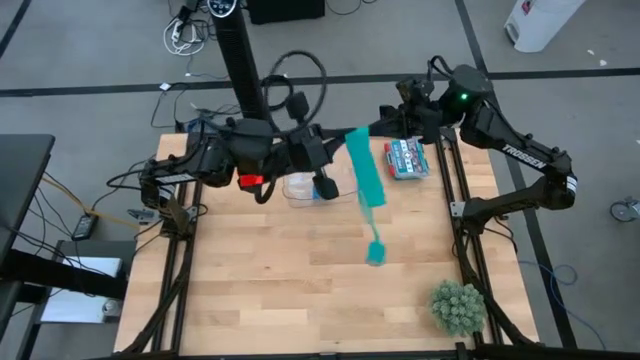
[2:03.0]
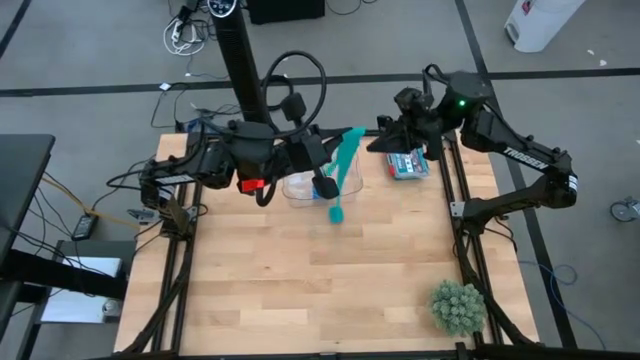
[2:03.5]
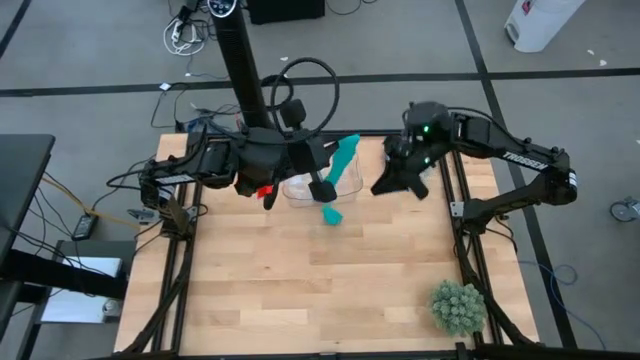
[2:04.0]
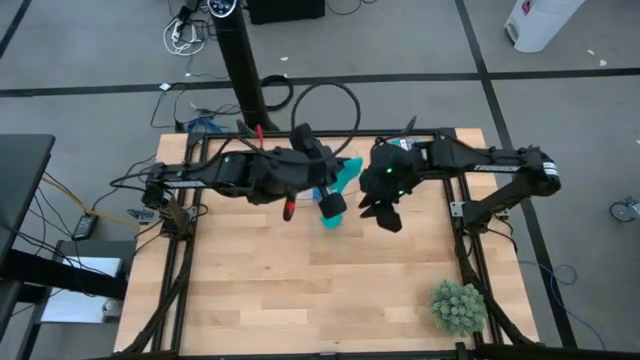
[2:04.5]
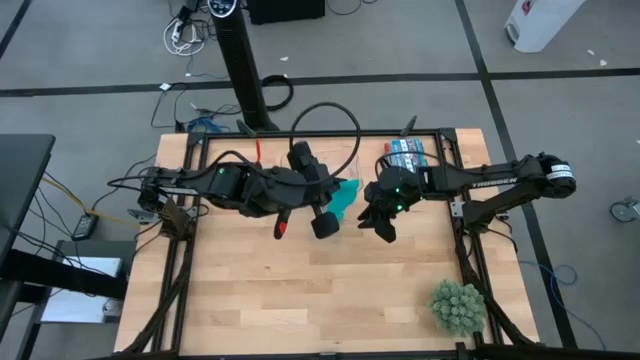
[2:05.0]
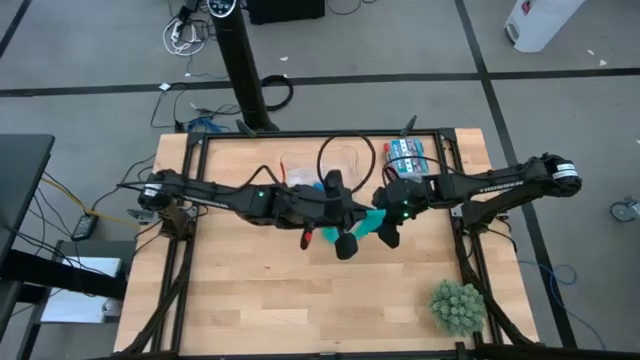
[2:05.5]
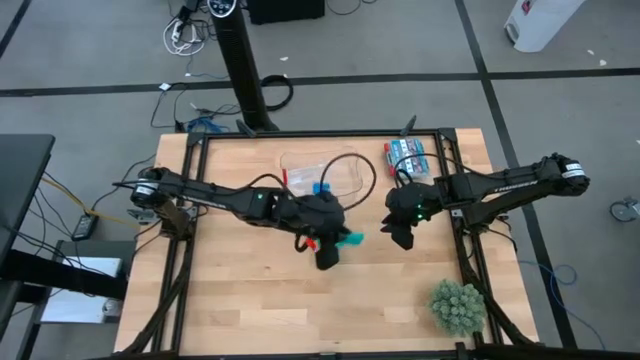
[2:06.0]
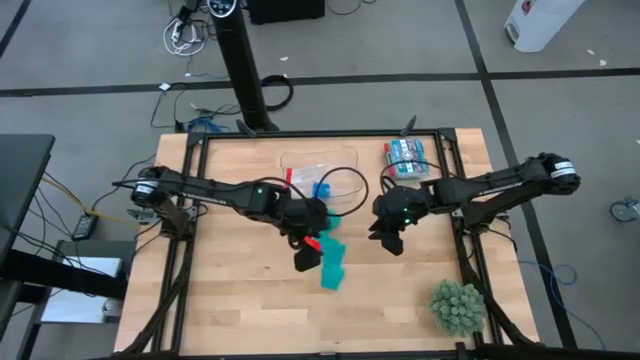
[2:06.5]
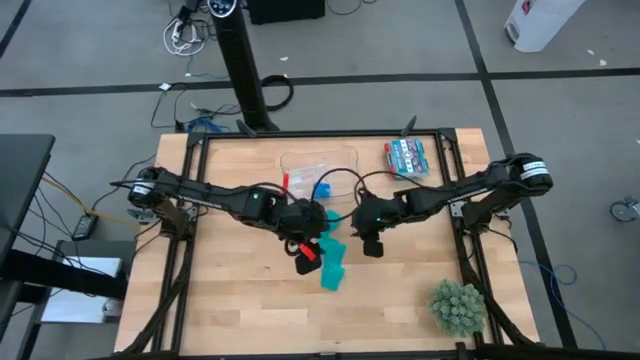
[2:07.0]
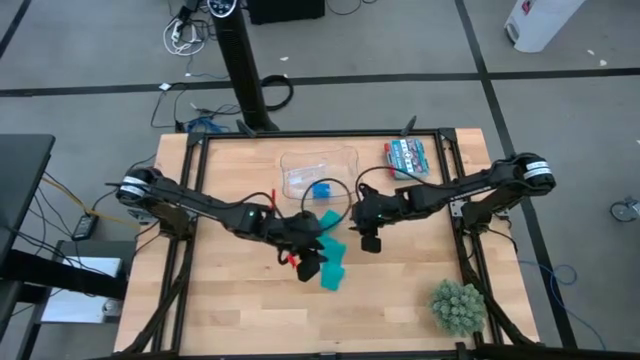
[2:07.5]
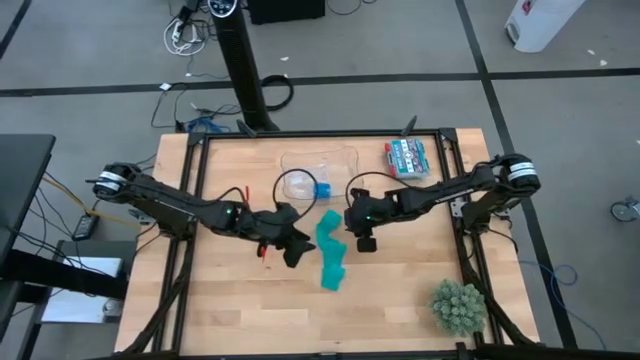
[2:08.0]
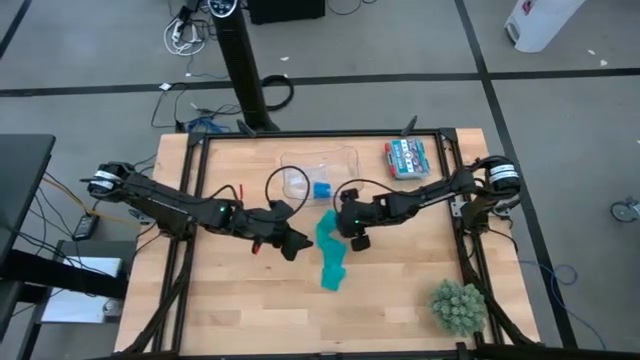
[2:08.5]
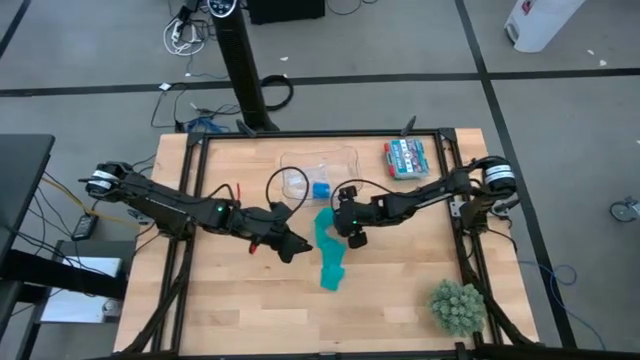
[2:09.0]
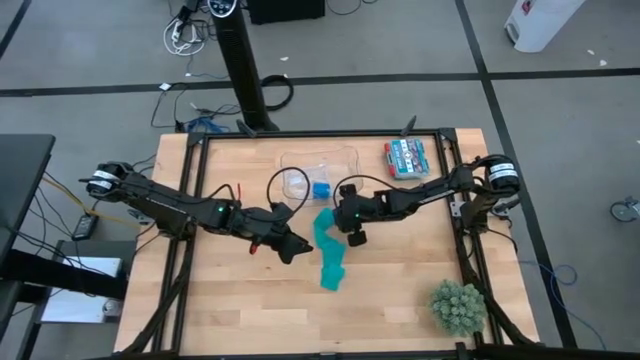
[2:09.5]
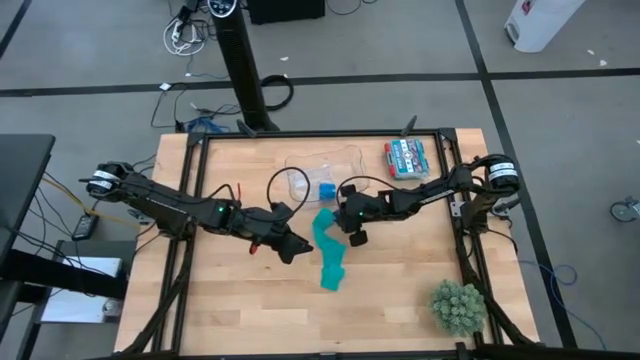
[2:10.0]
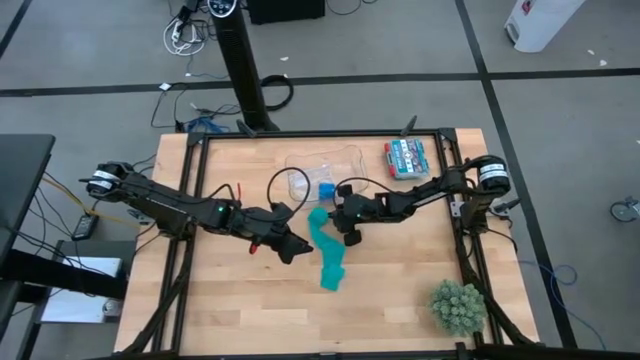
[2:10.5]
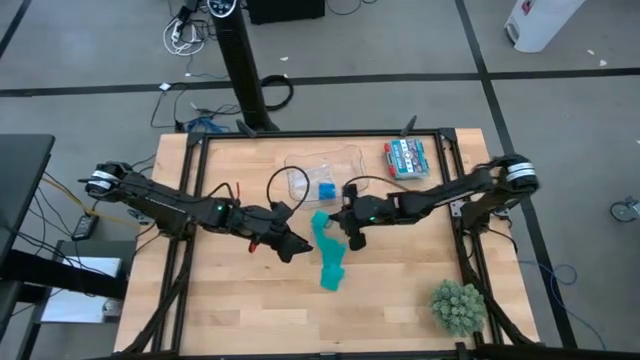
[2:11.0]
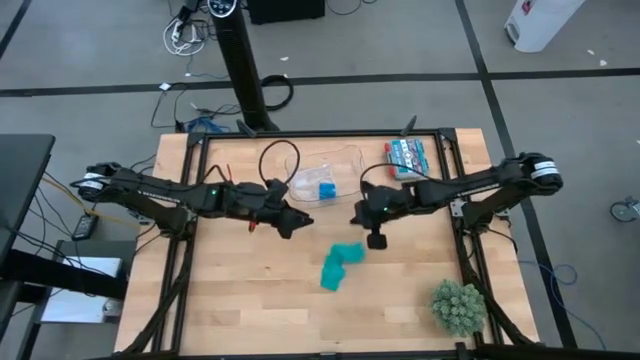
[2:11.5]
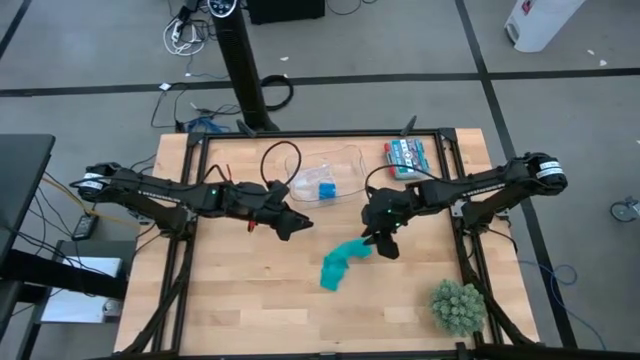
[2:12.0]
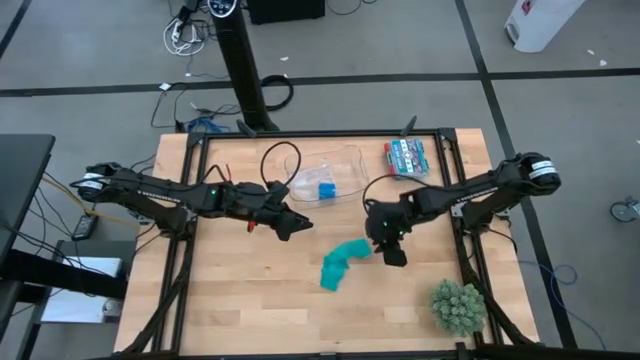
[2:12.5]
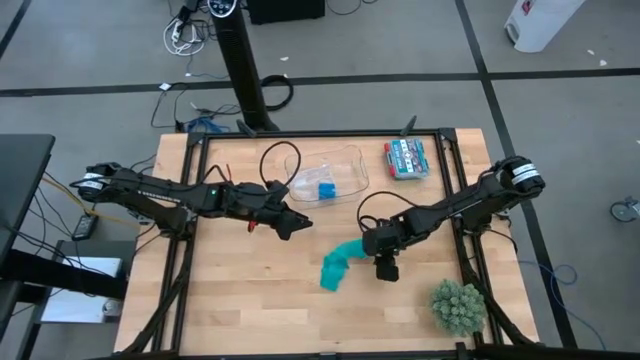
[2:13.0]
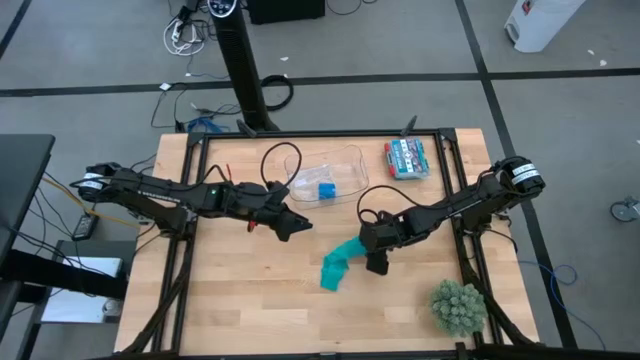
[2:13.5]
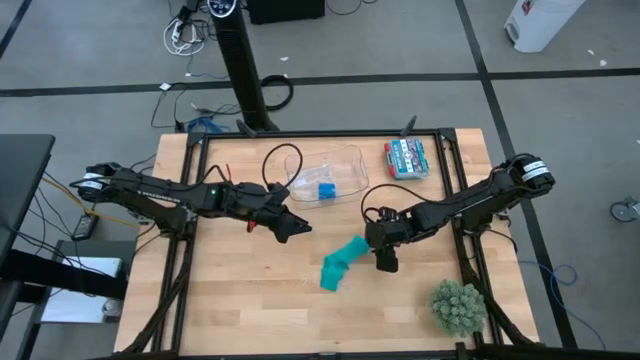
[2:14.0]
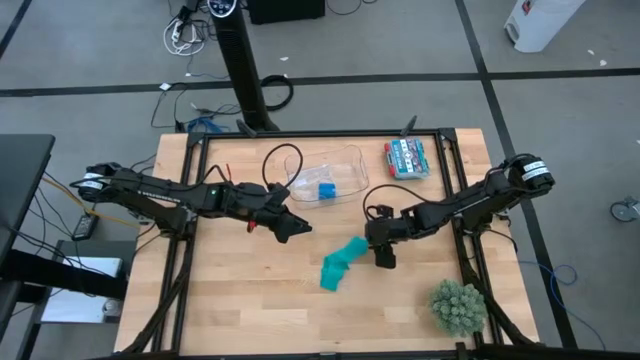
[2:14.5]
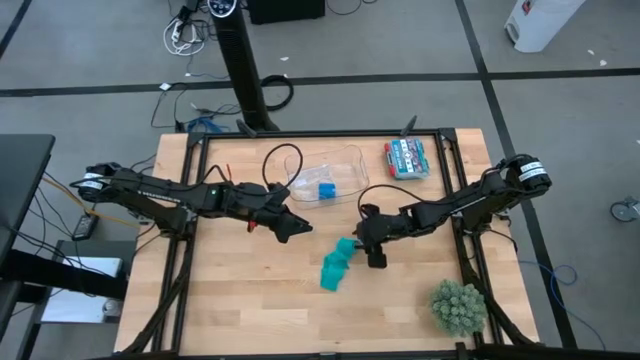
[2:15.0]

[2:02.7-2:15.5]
Task: Roll bandage
Roll the sky blue bandage

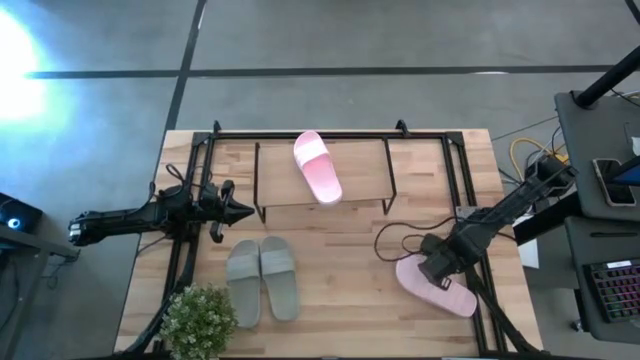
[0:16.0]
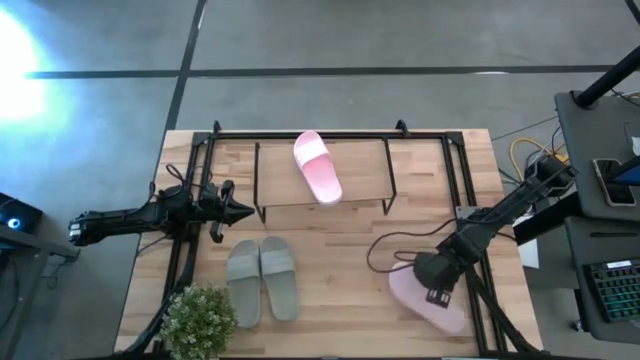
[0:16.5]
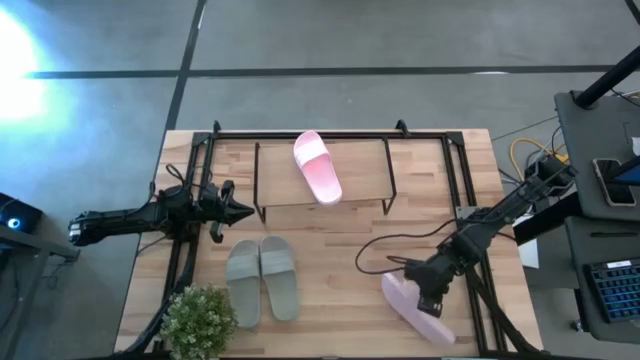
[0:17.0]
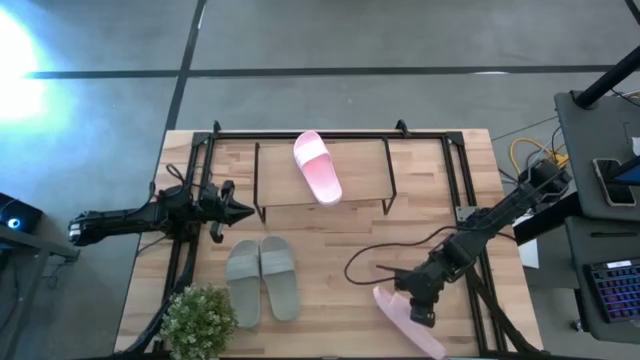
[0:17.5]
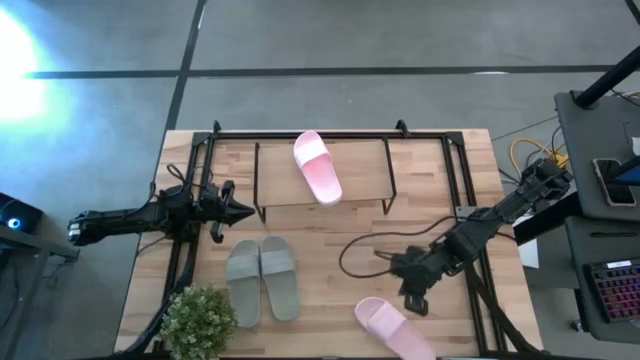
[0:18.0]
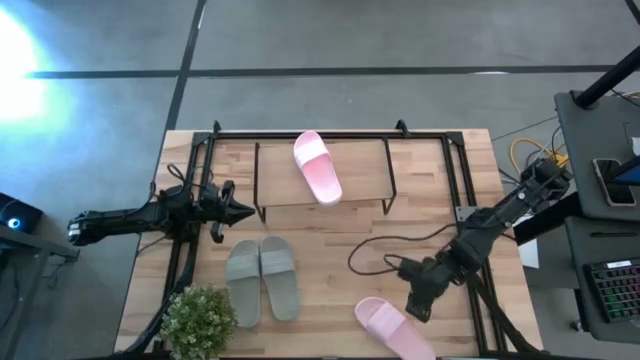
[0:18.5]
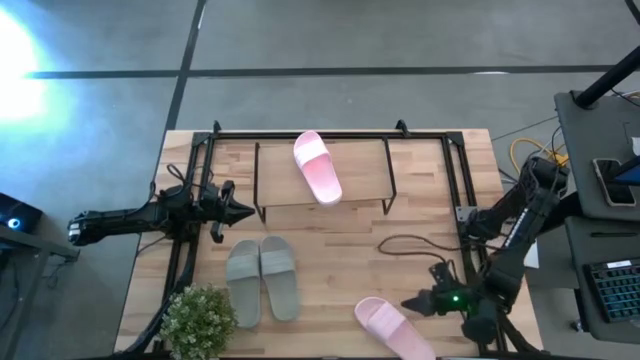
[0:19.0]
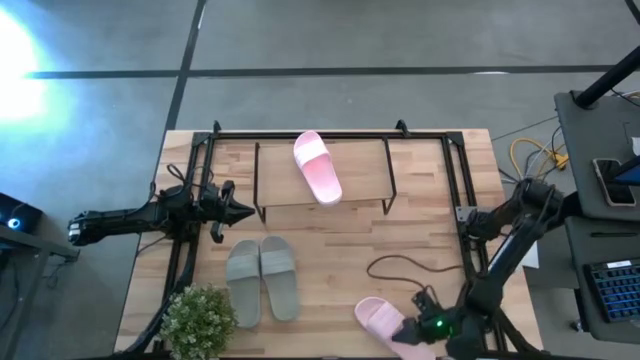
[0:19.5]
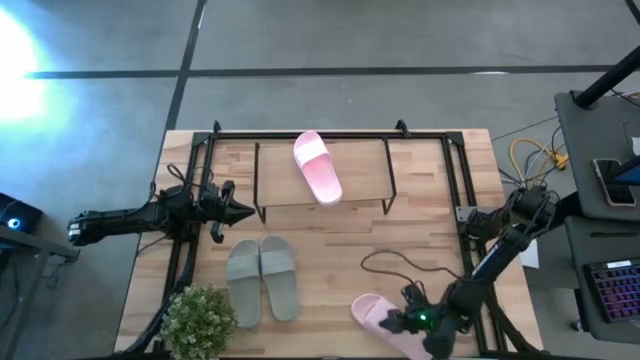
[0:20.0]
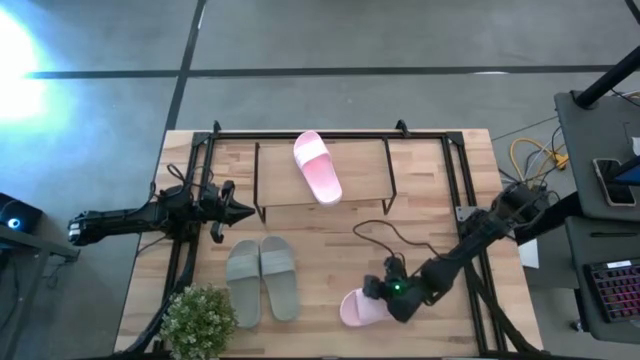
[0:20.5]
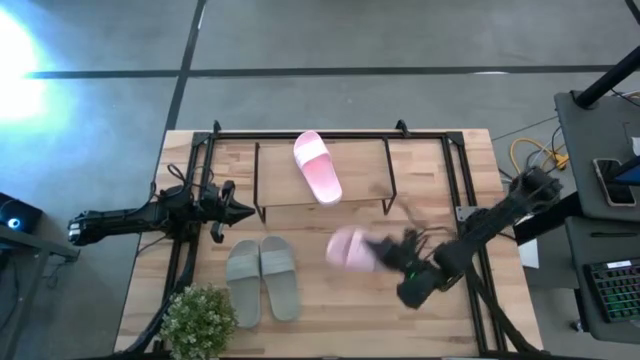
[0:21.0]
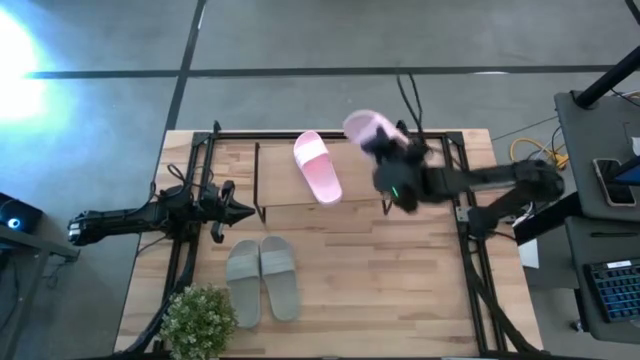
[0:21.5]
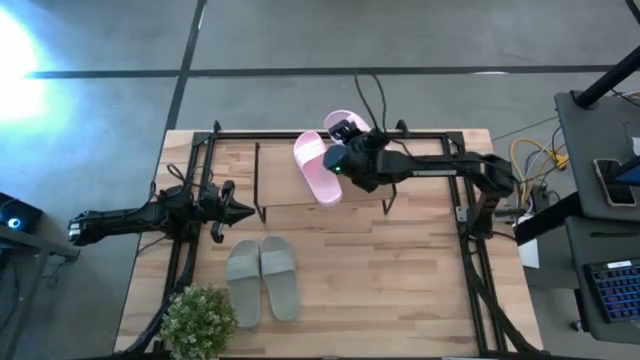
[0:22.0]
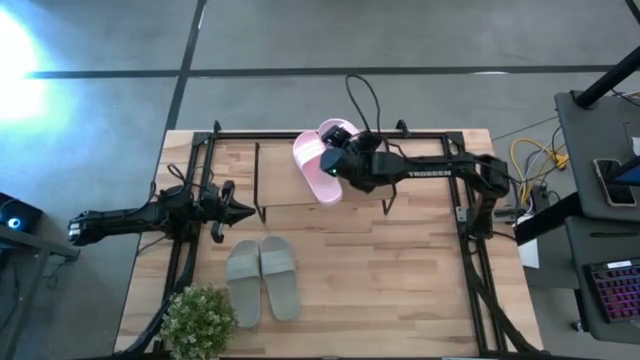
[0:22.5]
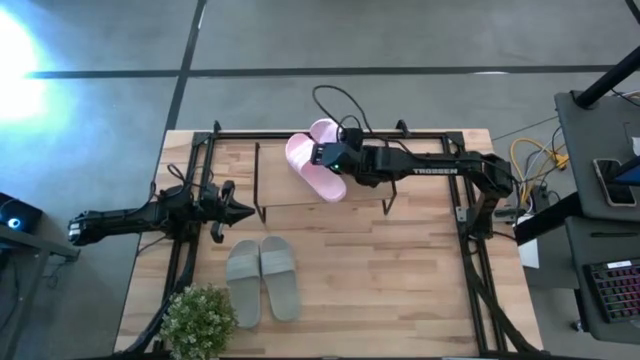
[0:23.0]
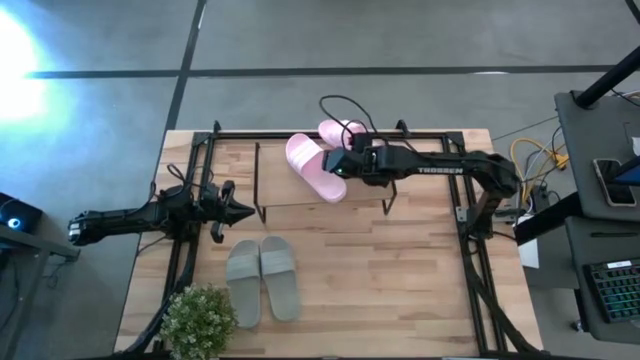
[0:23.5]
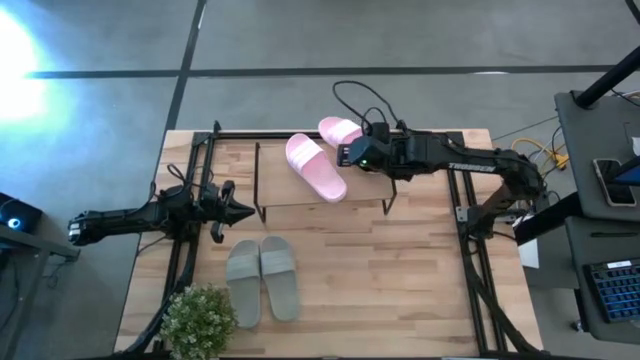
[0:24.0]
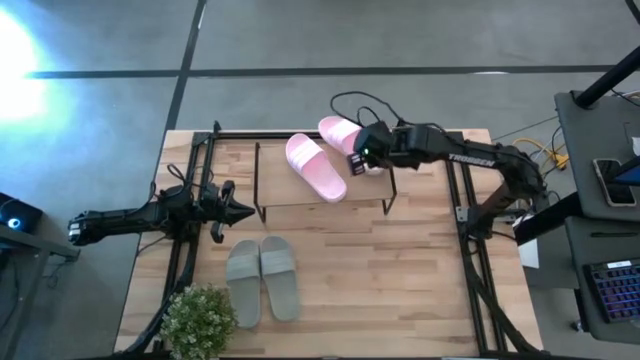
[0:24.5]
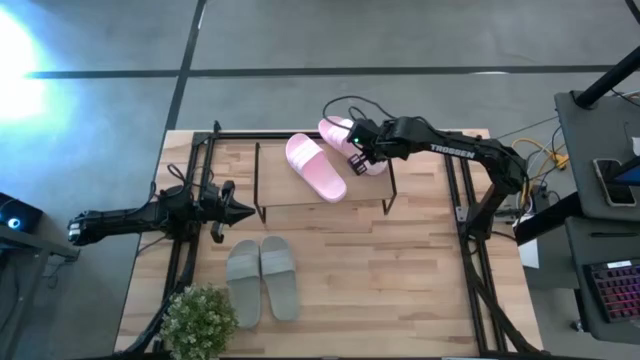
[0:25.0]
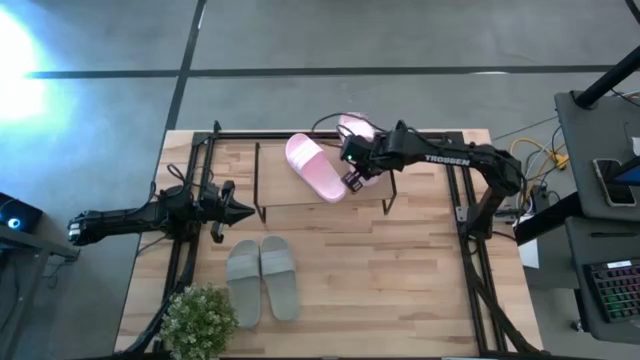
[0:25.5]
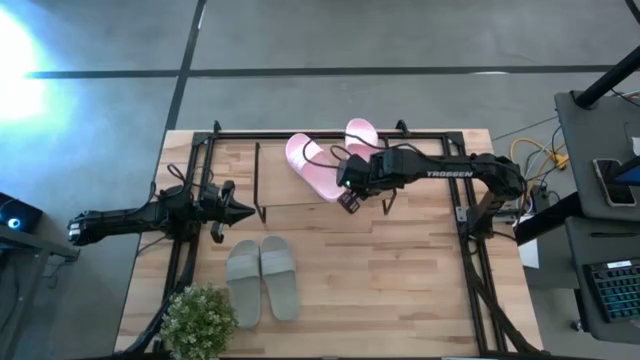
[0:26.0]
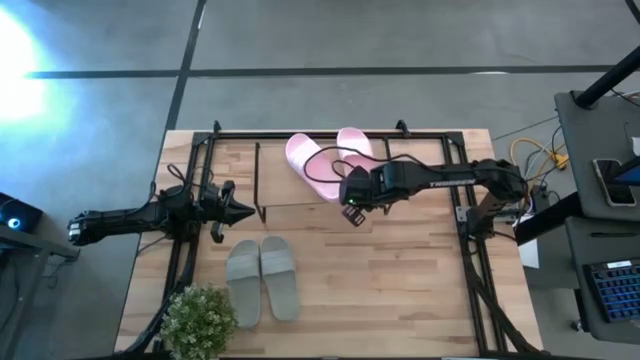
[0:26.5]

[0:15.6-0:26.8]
Task: Pick and place slides into the shelf
Put the pink slide on the shelf
